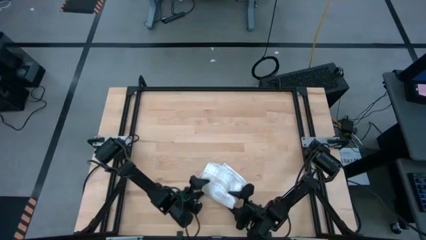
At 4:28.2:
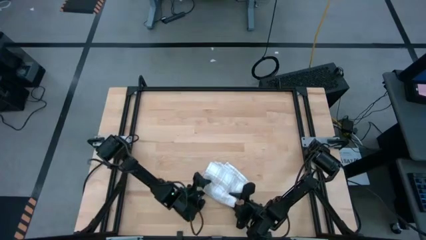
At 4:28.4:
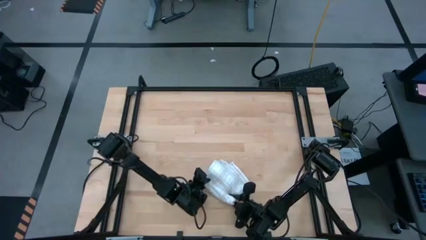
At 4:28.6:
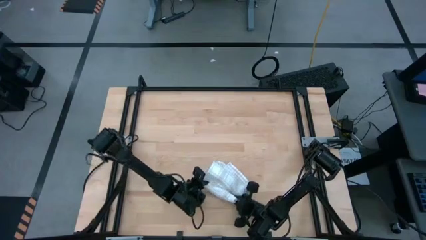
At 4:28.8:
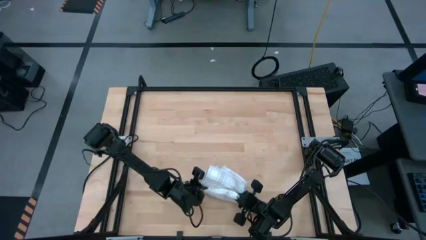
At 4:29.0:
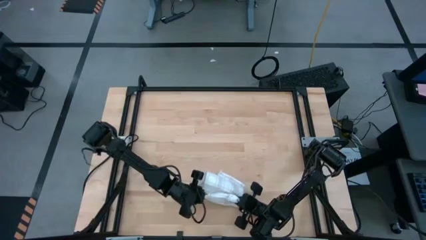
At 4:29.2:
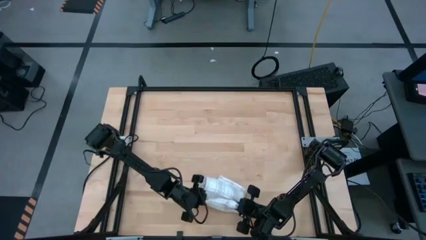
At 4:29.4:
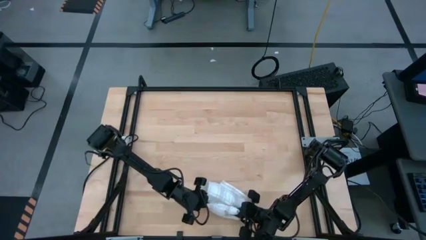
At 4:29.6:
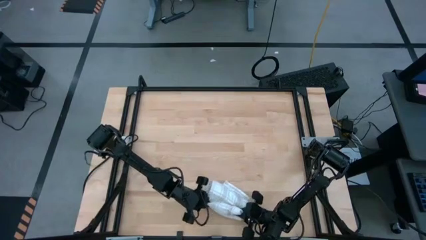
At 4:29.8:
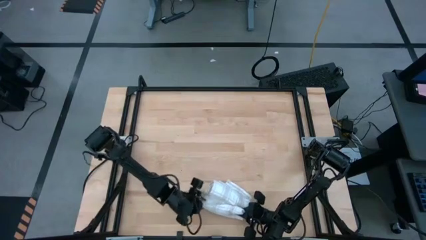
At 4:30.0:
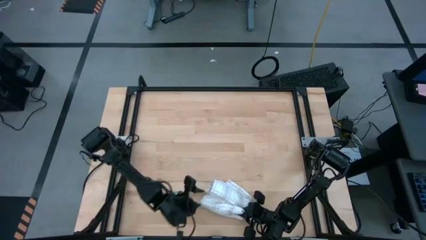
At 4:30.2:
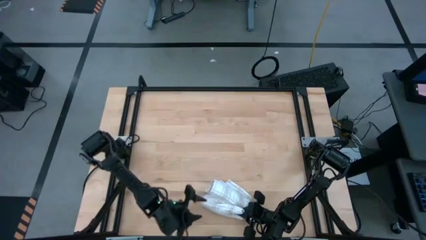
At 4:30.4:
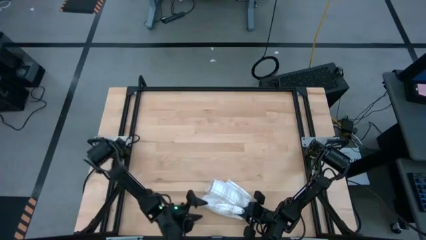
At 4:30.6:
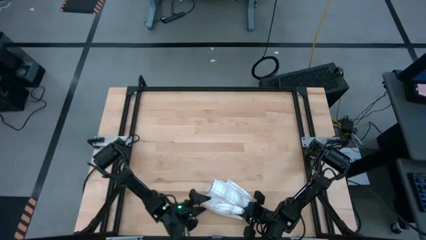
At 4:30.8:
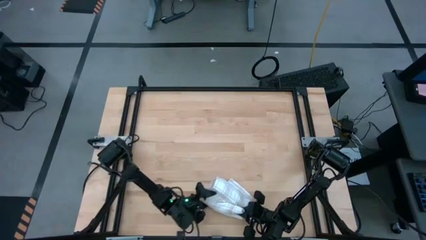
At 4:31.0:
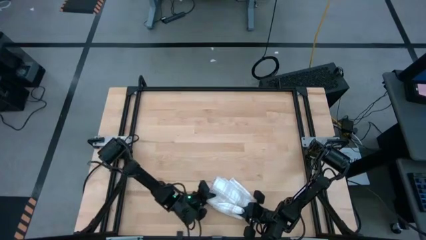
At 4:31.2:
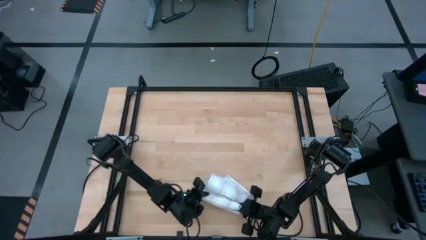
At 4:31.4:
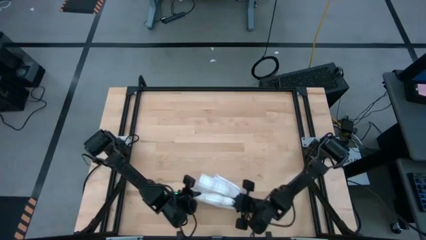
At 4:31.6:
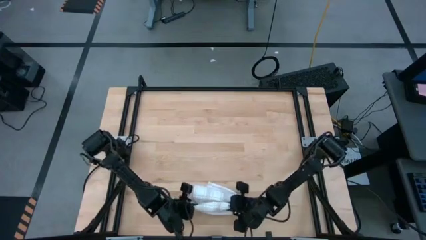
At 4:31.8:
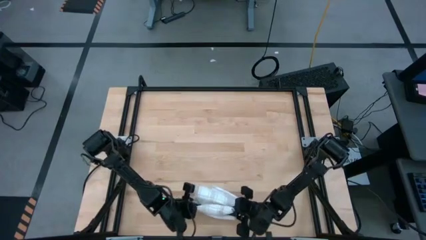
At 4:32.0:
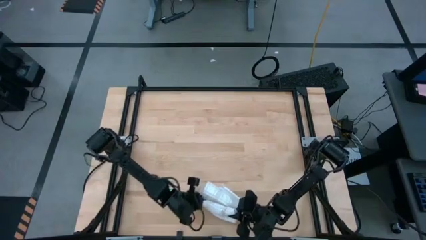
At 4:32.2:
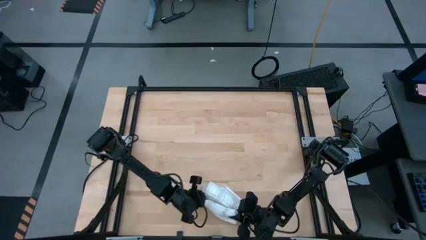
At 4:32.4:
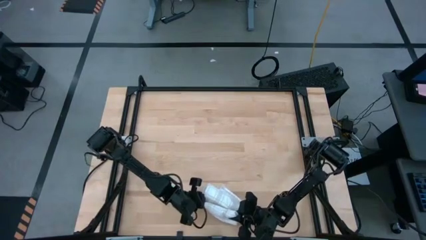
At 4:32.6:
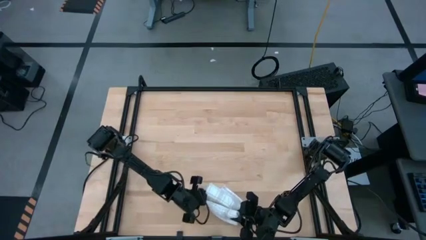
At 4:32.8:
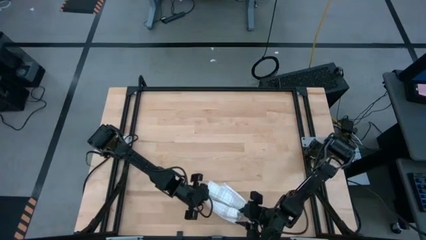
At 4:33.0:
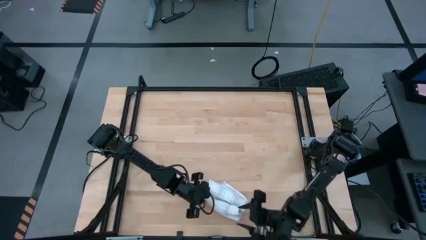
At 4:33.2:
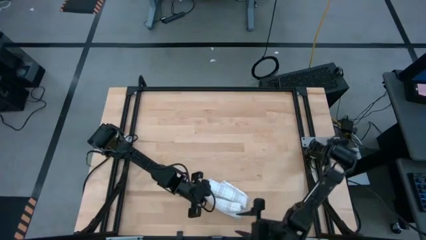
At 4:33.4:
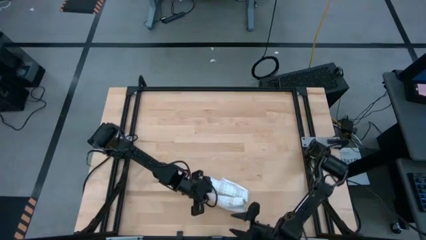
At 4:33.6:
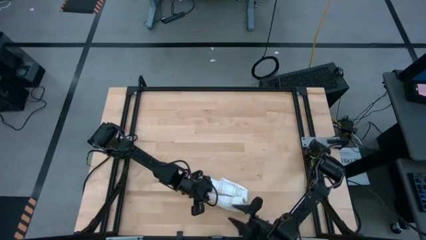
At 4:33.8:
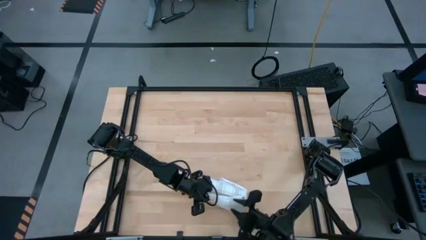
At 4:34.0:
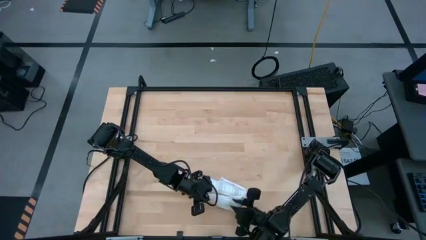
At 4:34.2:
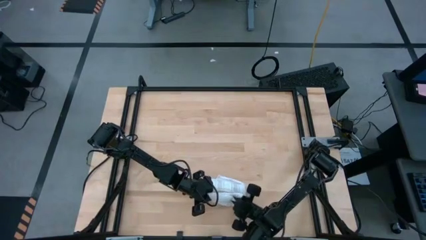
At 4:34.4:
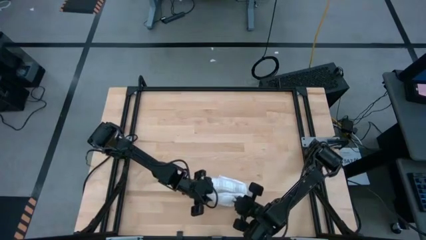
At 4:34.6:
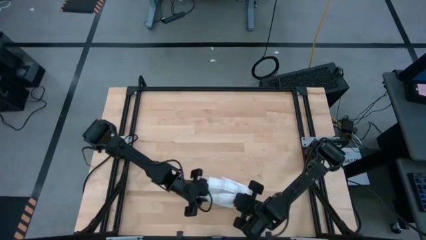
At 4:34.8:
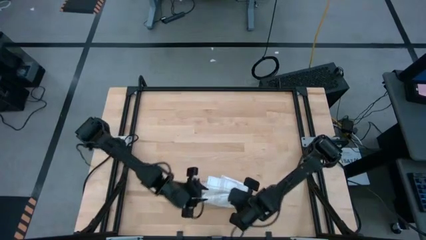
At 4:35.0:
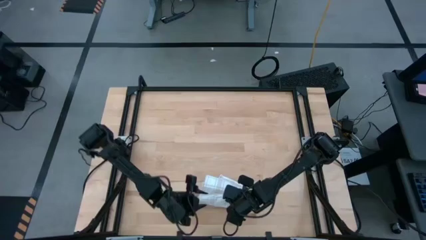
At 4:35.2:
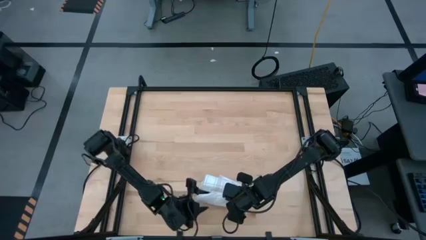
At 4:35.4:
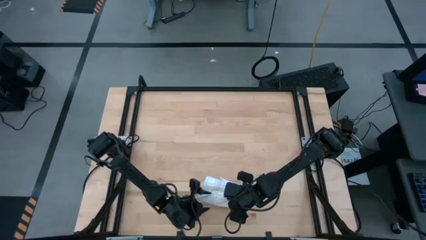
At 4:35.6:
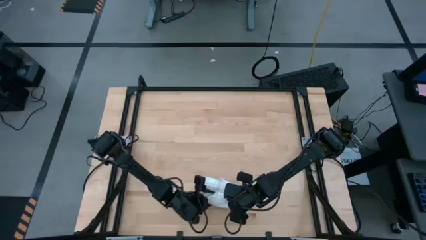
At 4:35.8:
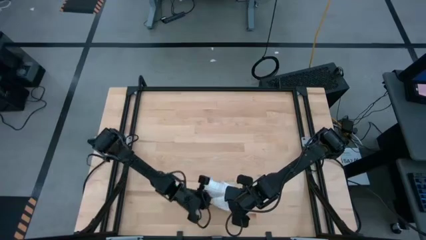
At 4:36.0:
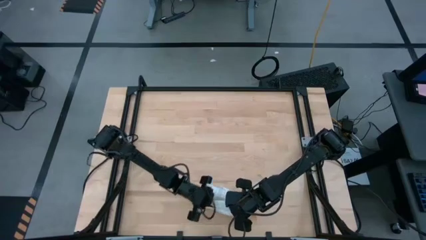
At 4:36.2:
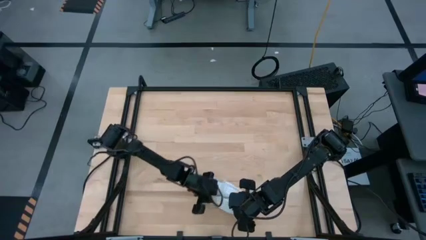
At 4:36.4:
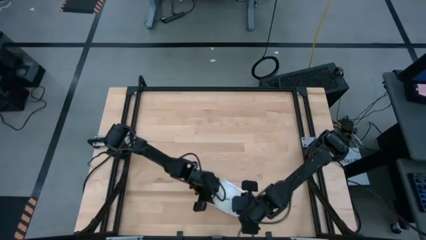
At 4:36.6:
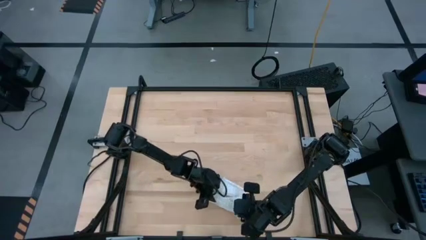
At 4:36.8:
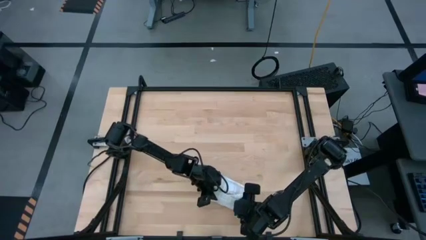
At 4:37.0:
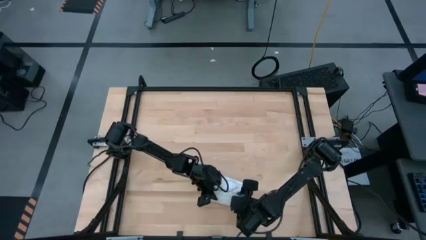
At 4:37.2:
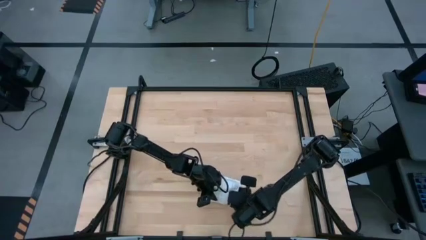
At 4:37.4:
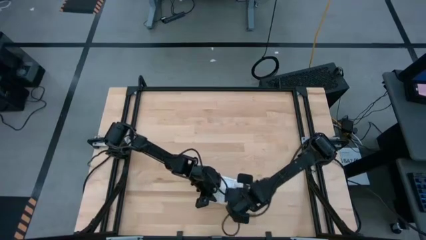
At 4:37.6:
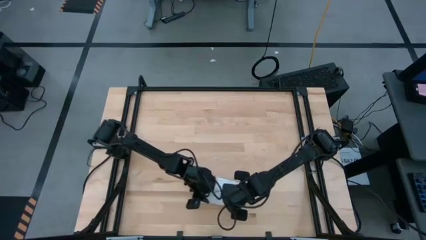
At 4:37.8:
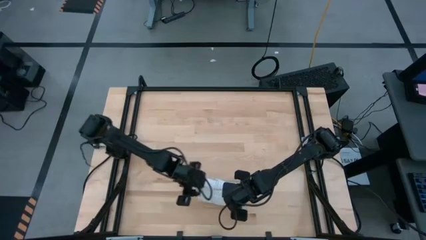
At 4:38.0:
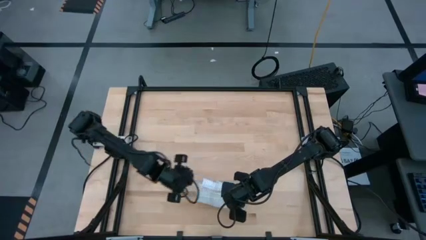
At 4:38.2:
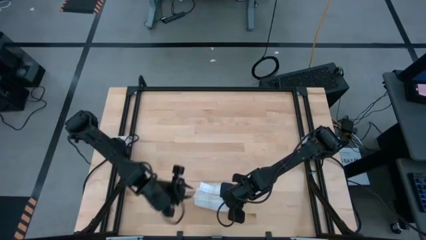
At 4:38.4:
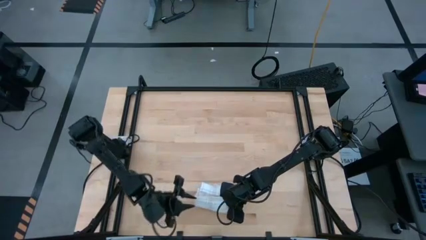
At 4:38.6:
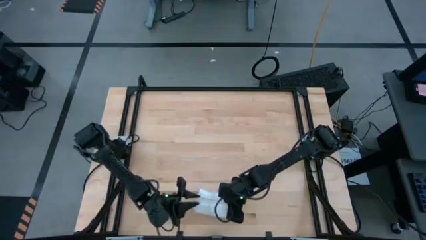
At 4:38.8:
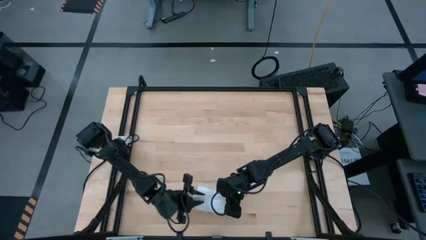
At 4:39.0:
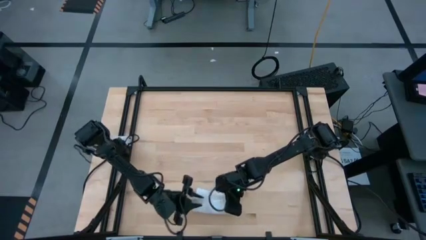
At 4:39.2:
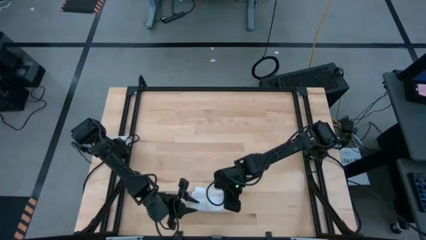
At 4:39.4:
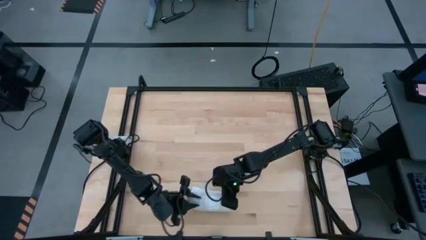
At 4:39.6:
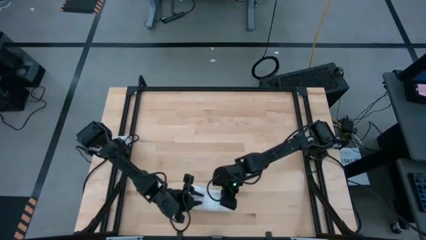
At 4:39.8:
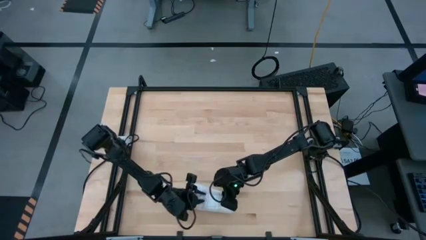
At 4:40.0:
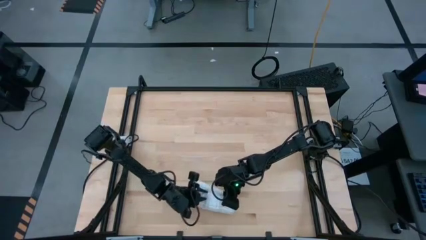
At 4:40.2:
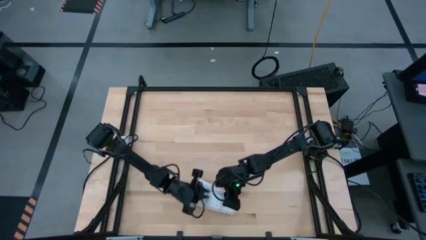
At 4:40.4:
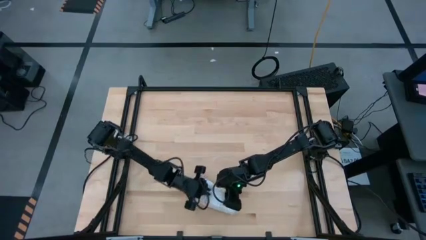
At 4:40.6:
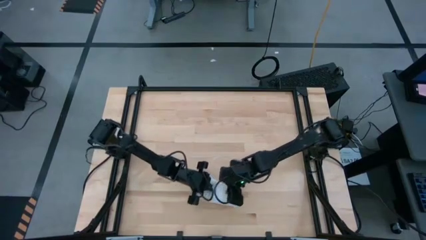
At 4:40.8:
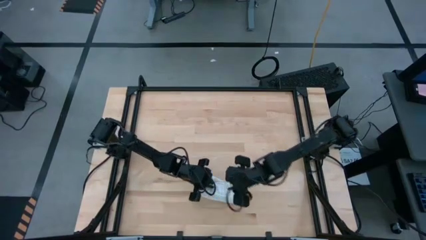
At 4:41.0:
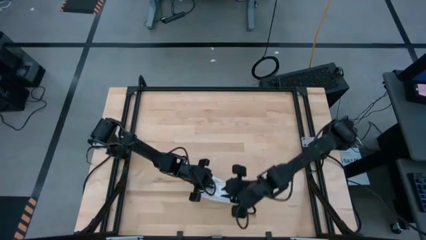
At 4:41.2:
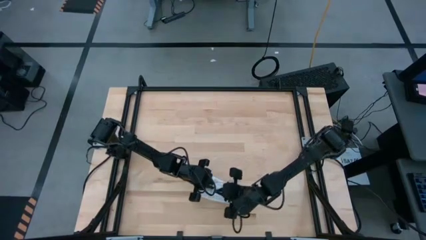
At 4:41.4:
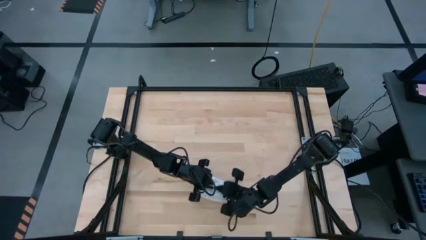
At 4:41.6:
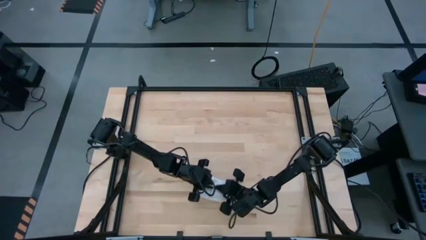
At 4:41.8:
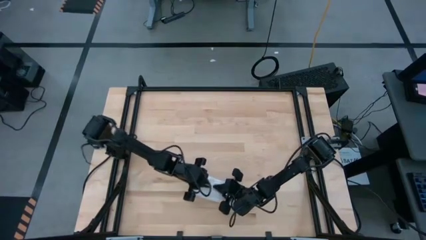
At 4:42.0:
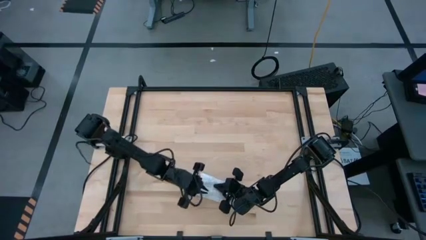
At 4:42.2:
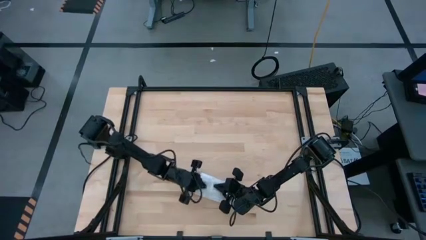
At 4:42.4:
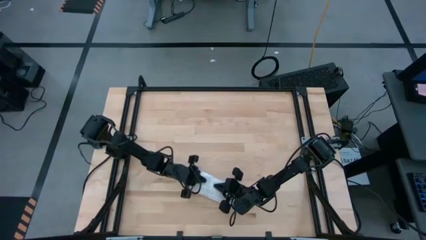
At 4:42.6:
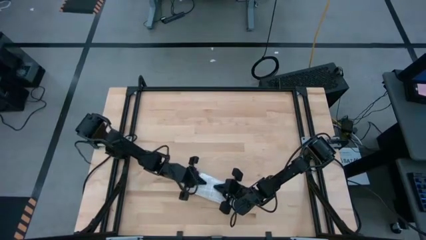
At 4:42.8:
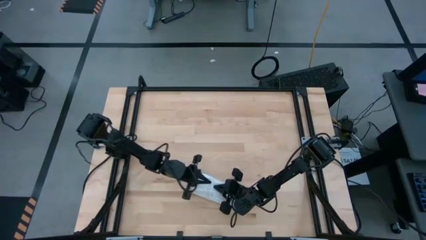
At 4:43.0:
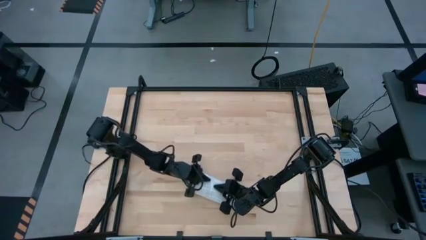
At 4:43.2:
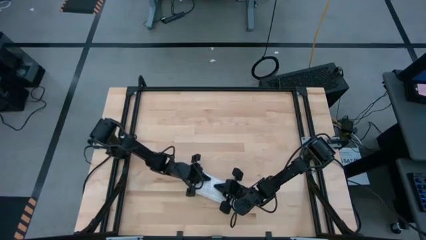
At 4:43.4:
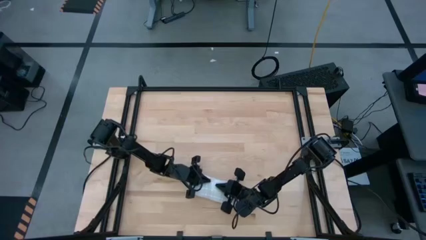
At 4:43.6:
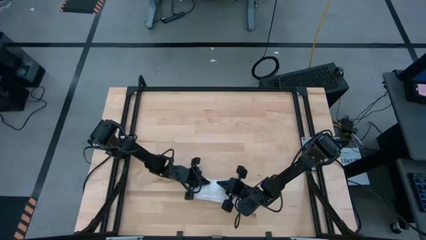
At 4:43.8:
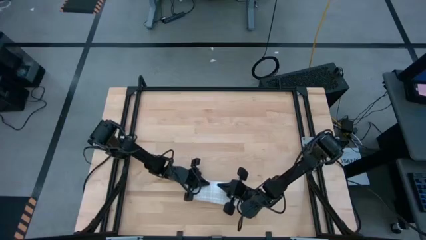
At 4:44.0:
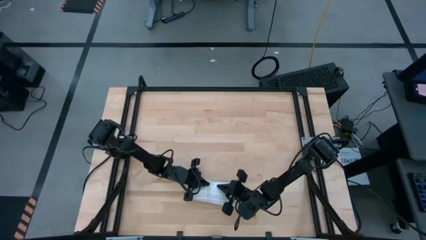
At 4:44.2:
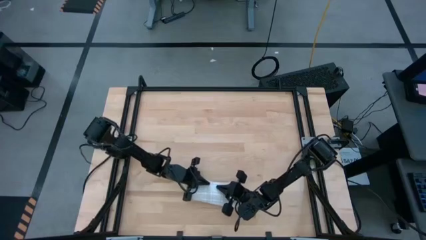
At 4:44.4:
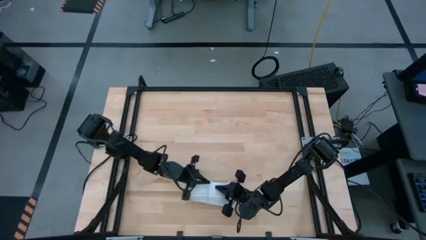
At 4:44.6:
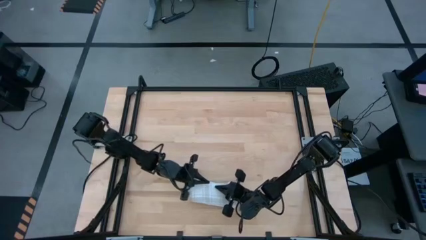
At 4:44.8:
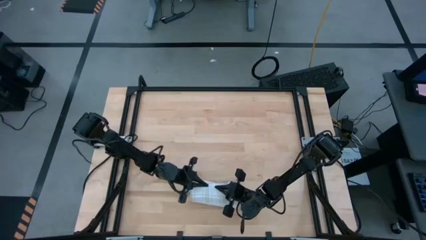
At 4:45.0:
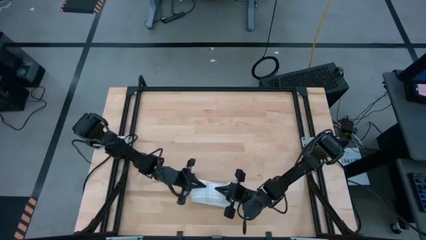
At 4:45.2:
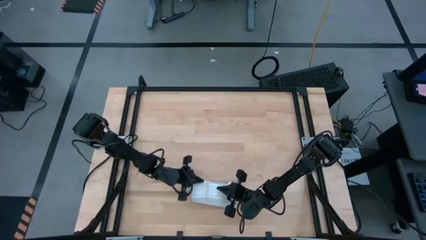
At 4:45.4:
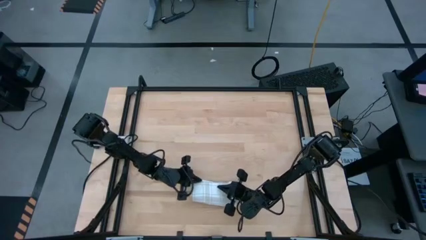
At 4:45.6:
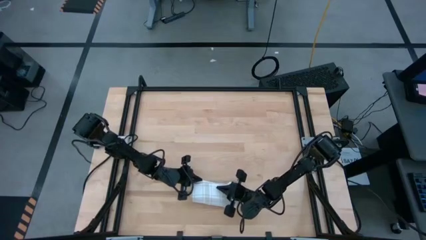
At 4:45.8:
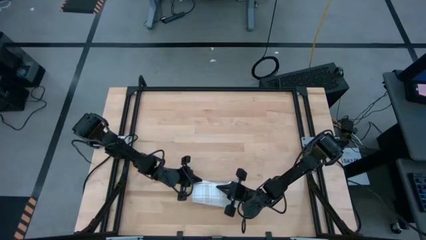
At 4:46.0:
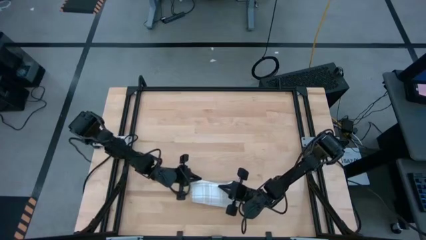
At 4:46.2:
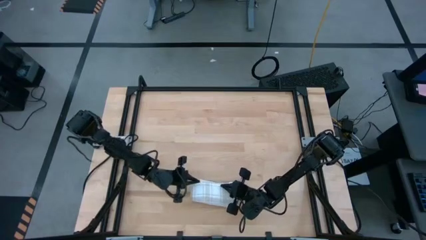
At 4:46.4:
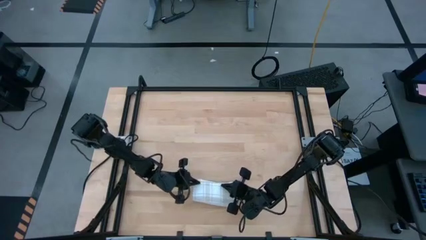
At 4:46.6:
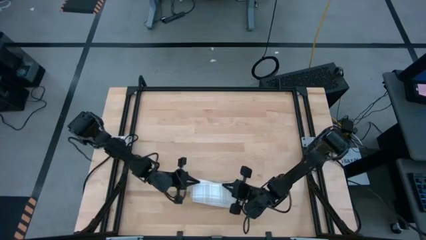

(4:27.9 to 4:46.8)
Task: Roll towel
Roll the white kitchen towel
